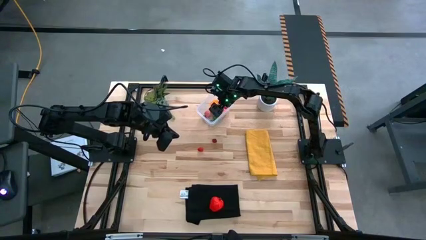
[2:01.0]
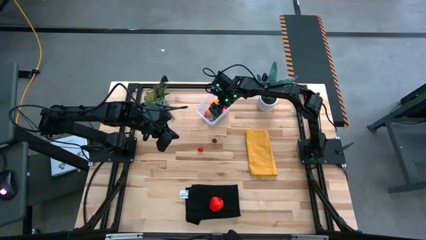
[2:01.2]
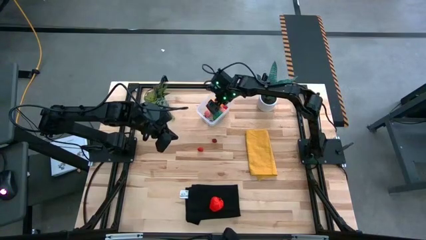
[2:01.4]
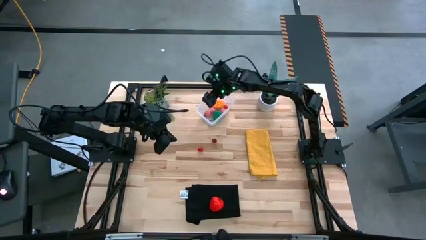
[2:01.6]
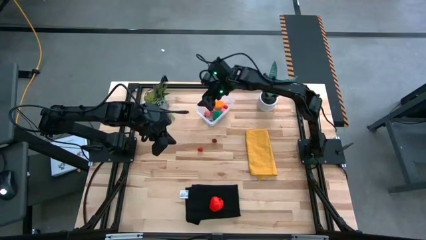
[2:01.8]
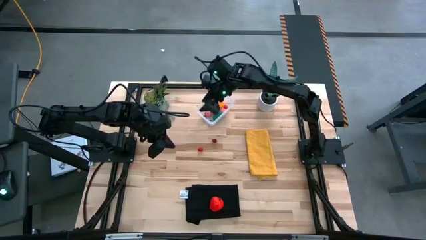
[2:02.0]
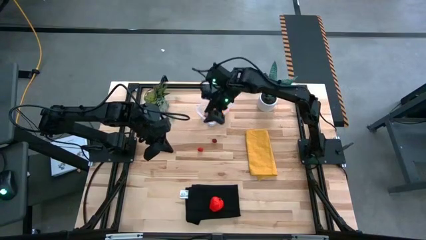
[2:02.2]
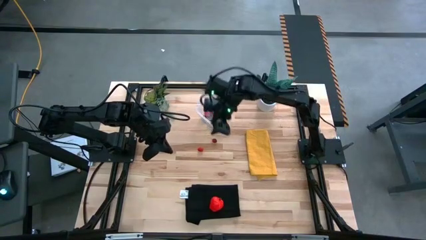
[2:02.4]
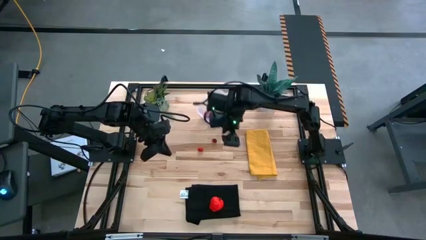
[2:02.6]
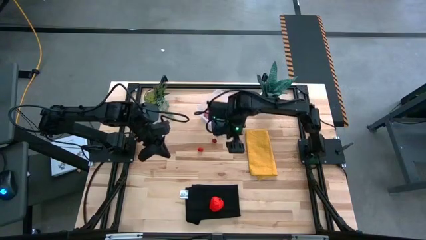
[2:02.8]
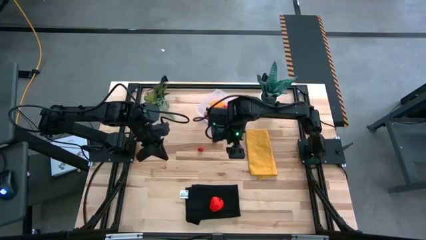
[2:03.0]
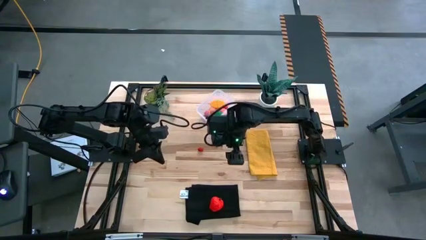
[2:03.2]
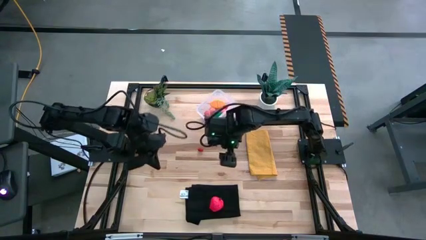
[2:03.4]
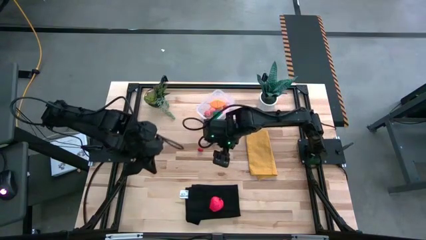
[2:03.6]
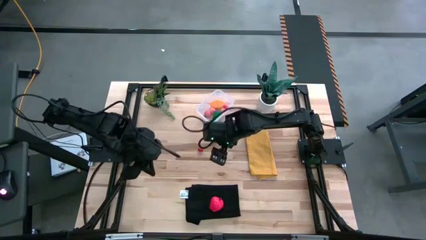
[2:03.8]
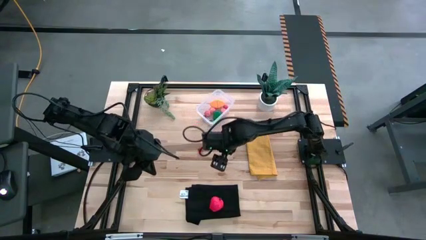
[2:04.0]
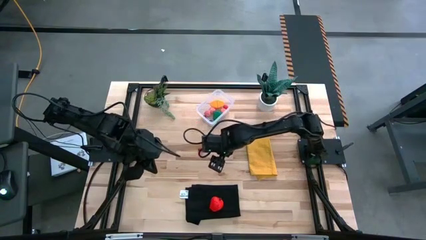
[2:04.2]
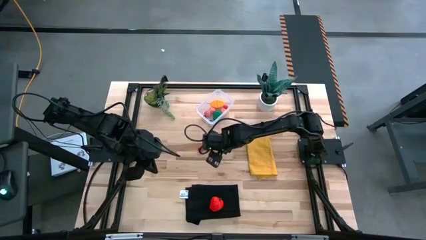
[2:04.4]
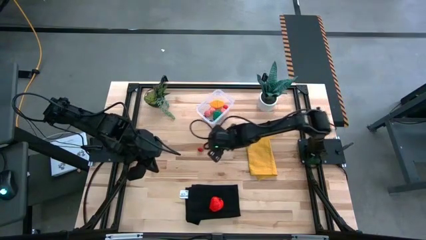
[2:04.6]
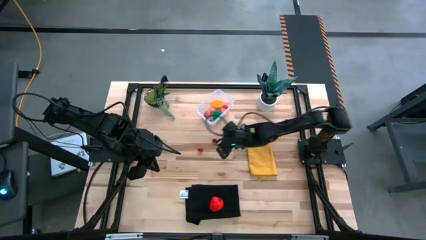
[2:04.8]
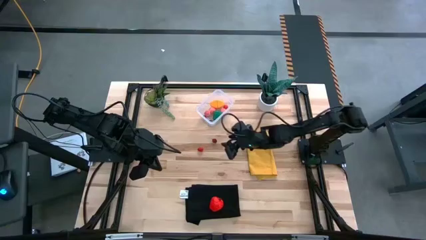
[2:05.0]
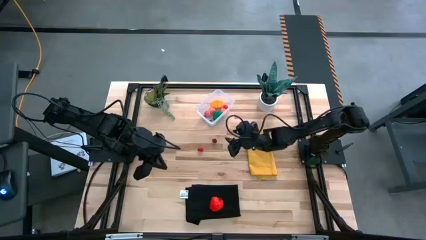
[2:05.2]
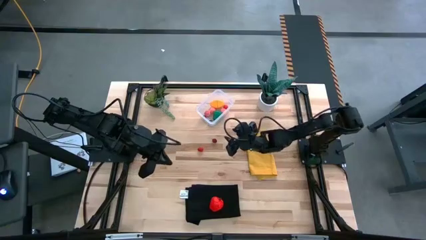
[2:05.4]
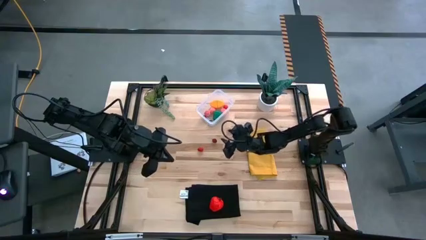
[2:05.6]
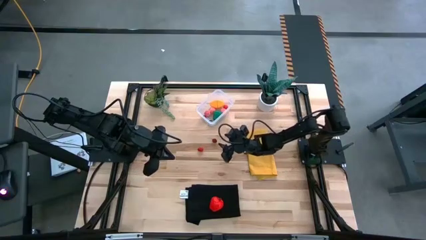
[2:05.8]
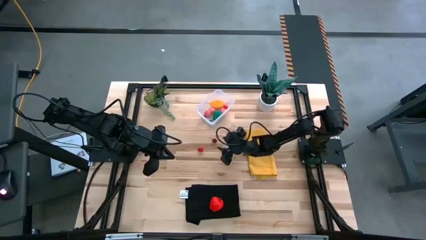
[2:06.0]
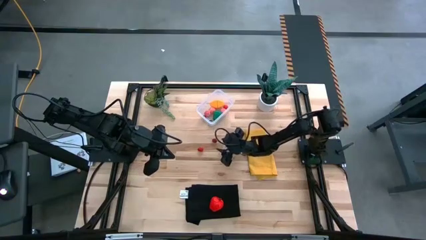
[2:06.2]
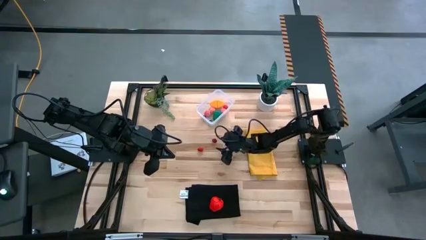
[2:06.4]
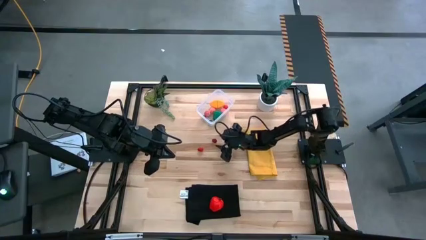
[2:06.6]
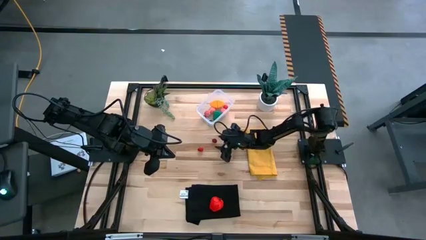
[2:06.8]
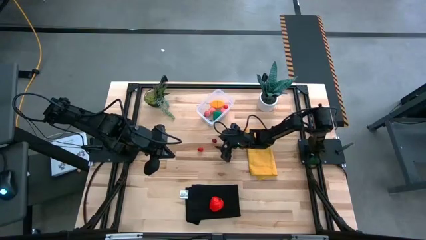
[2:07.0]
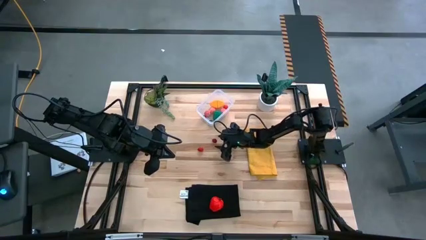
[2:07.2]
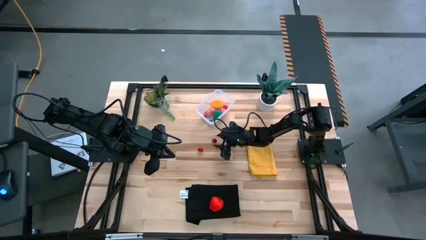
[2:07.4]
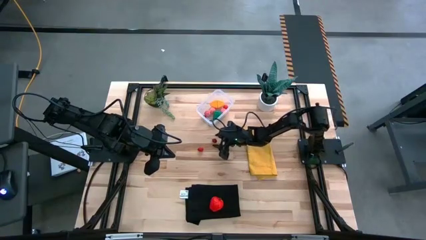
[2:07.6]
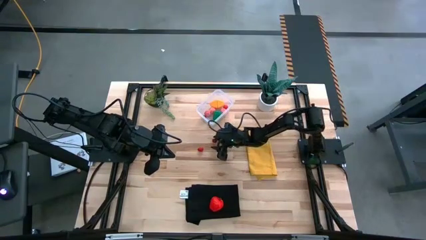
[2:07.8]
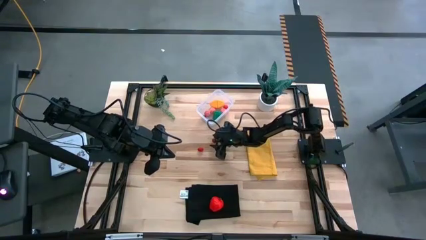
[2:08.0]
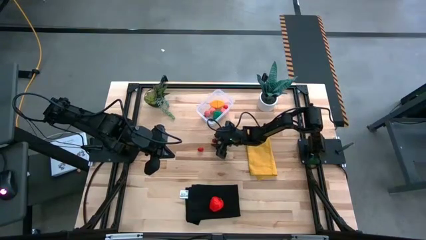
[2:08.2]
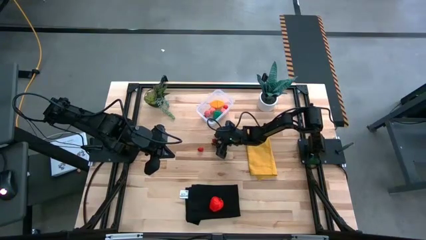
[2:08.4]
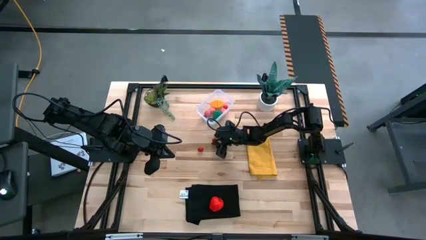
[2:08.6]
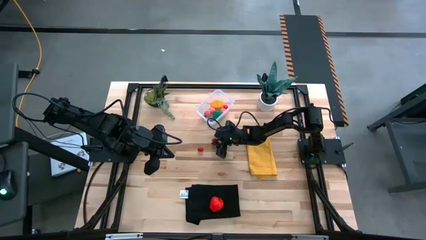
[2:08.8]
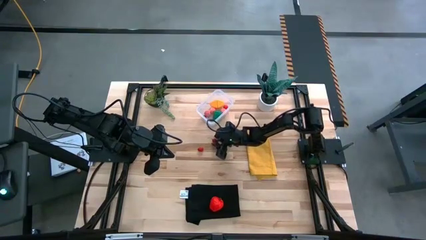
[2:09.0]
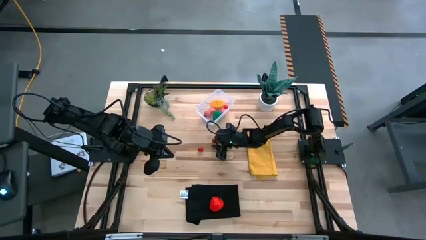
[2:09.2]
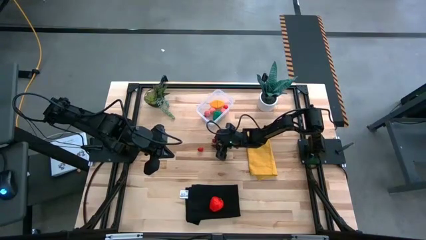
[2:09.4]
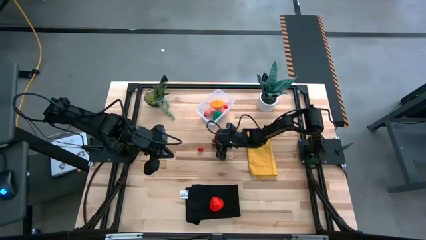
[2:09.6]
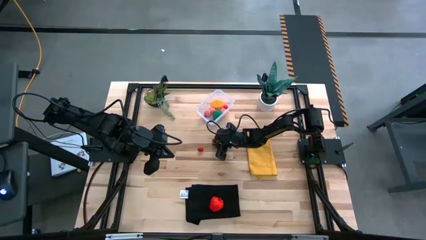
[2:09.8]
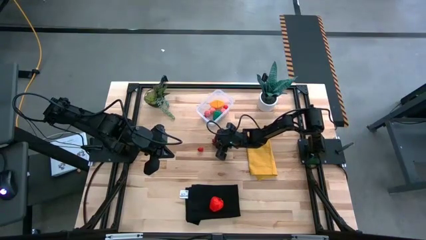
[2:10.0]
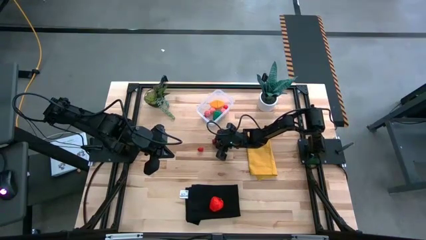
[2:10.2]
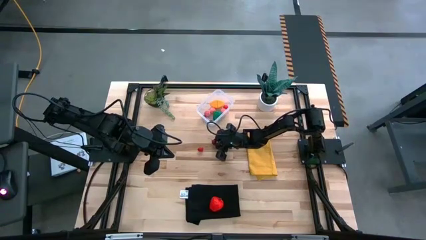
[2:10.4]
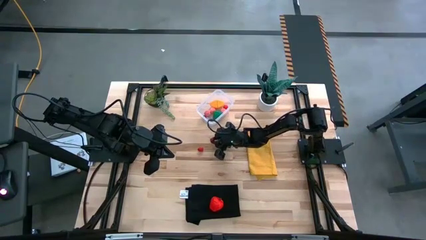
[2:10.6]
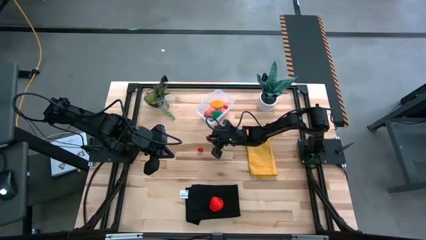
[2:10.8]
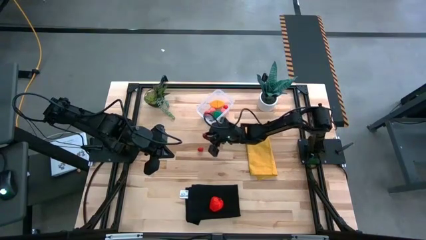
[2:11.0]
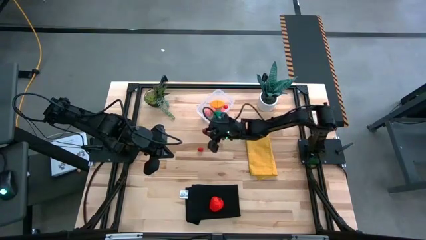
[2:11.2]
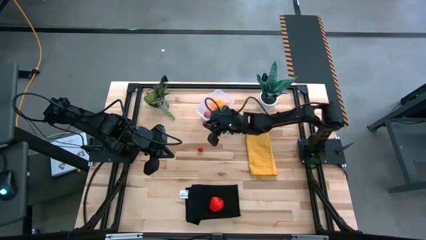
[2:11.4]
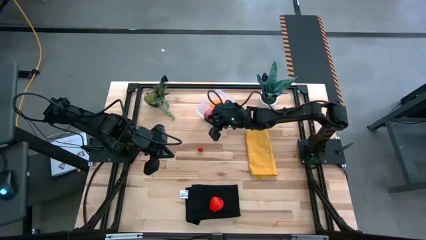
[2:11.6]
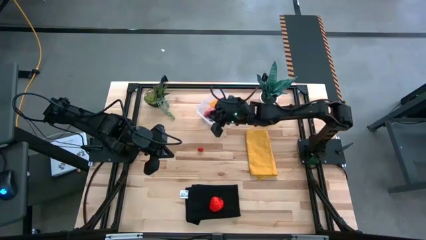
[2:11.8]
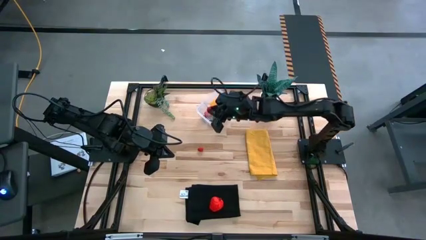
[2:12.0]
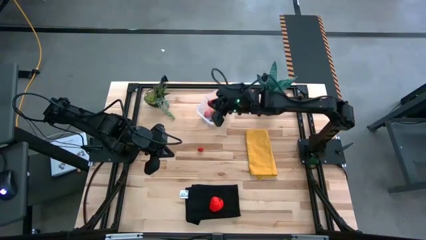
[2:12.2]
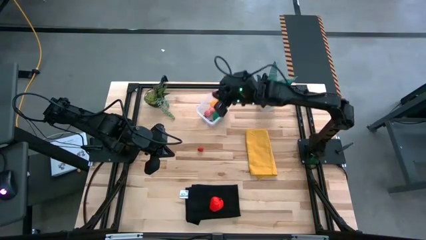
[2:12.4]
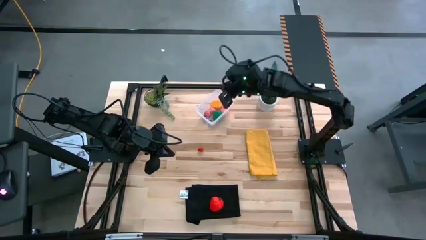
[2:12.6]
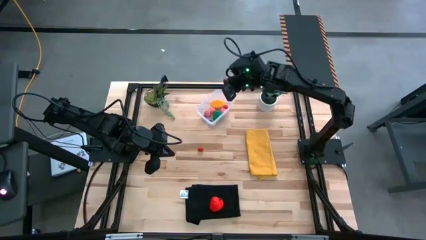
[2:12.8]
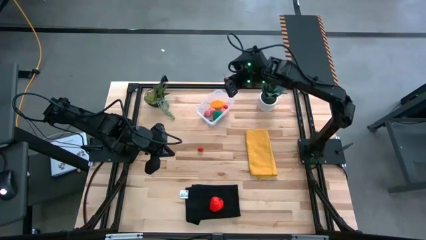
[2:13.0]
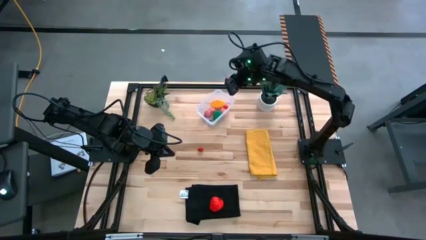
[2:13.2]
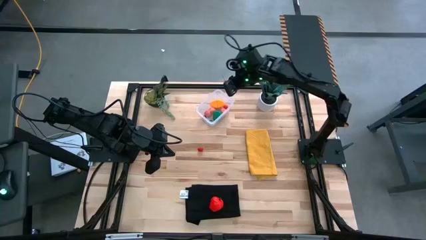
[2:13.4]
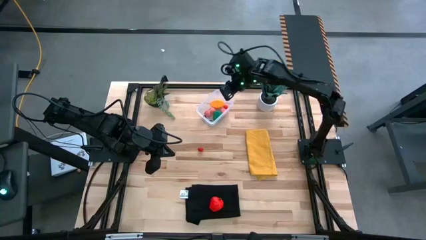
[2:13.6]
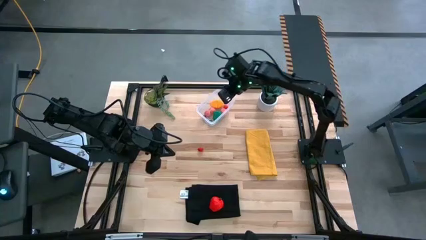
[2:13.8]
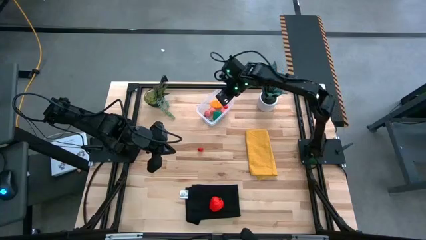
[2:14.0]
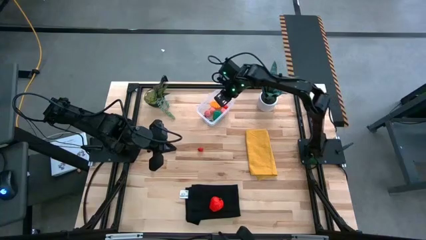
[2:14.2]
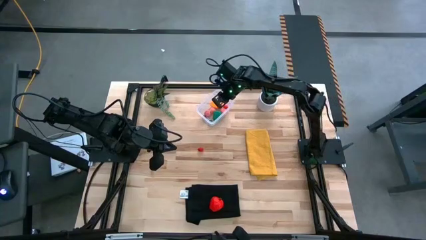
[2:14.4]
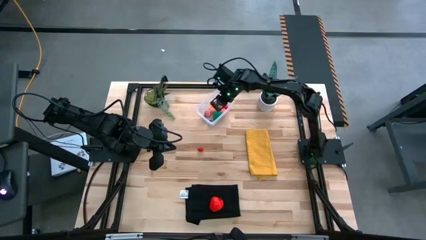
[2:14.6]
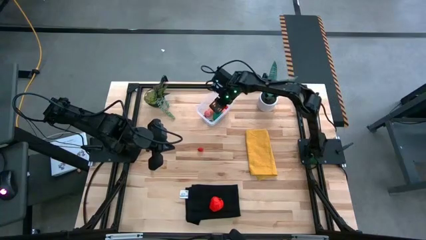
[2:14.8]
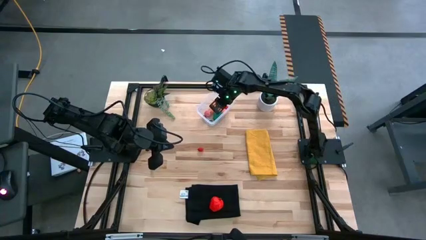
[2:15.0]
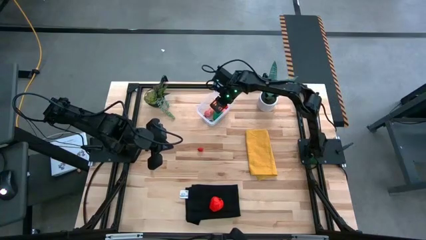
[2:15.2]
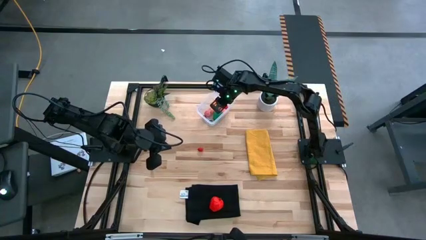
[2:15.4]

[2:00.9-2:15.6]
Task: Pick and placing Produce into tupperware
Put the red cherry into the transparent bin
